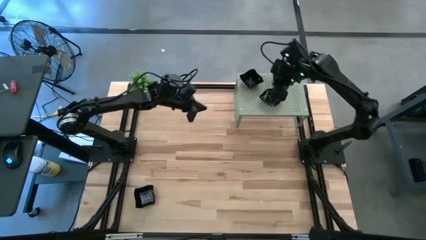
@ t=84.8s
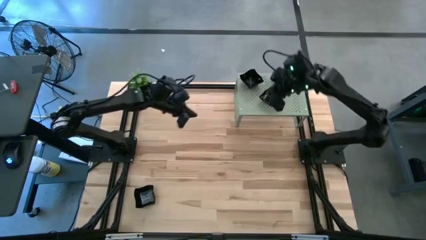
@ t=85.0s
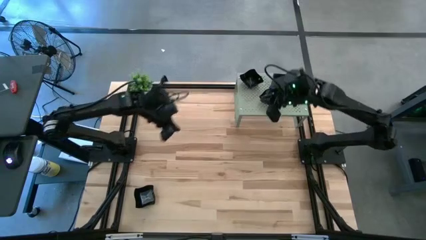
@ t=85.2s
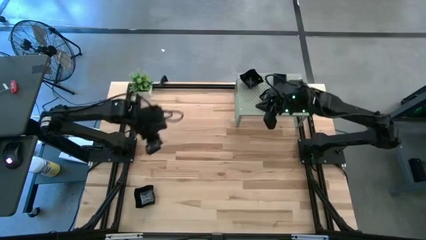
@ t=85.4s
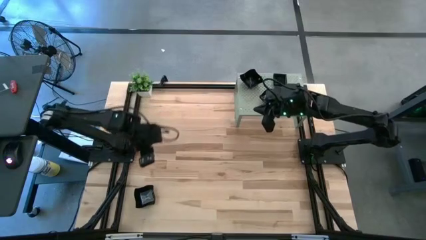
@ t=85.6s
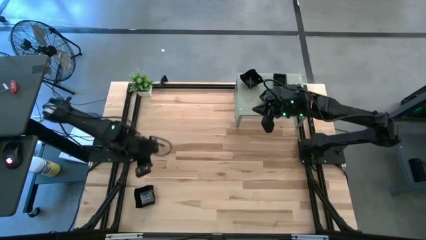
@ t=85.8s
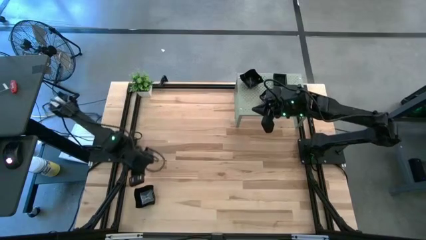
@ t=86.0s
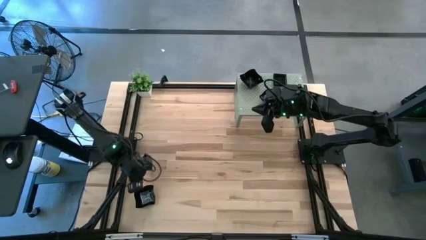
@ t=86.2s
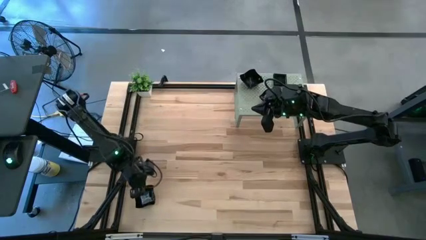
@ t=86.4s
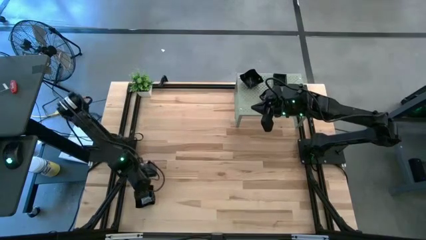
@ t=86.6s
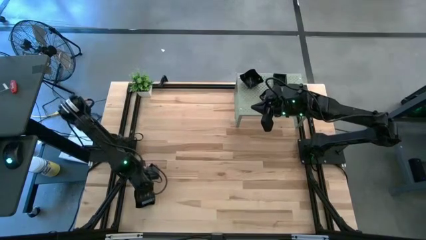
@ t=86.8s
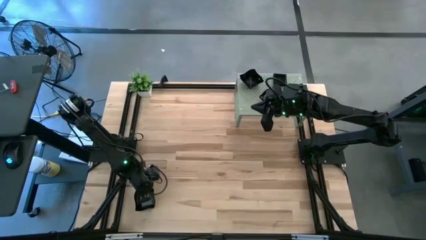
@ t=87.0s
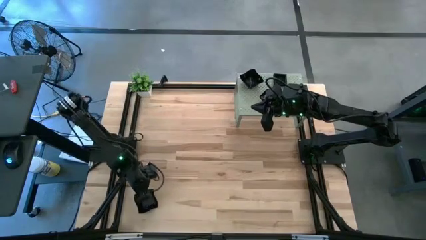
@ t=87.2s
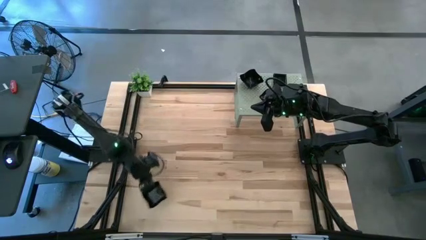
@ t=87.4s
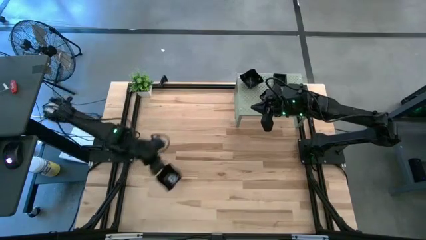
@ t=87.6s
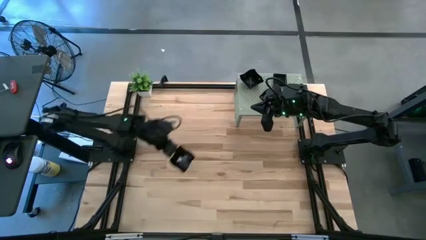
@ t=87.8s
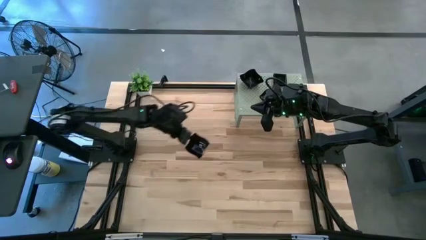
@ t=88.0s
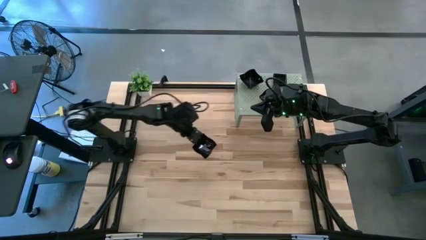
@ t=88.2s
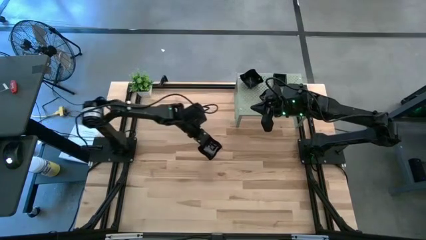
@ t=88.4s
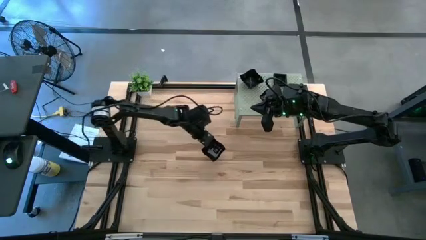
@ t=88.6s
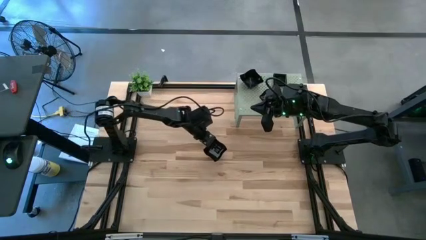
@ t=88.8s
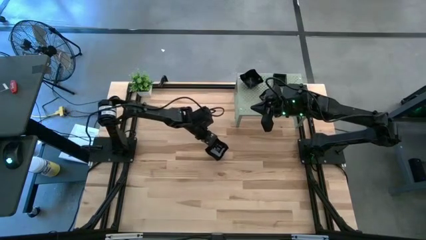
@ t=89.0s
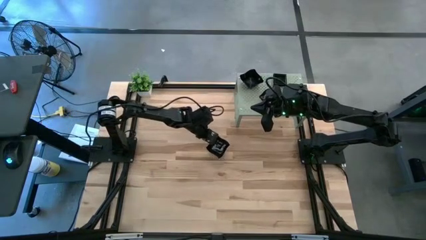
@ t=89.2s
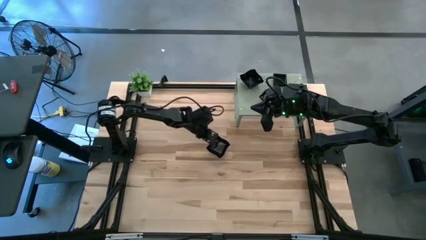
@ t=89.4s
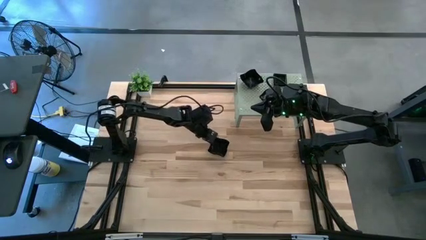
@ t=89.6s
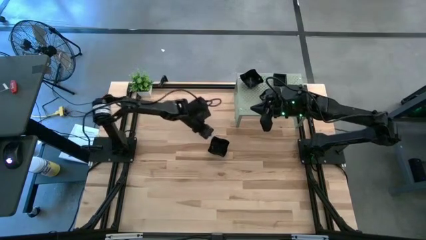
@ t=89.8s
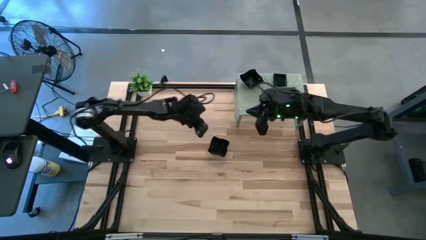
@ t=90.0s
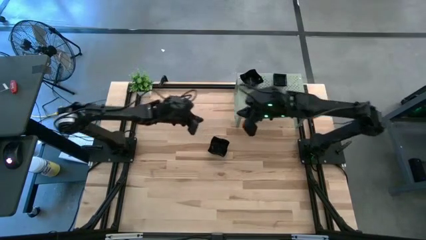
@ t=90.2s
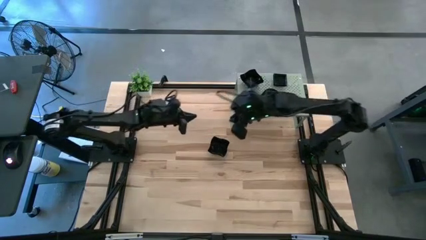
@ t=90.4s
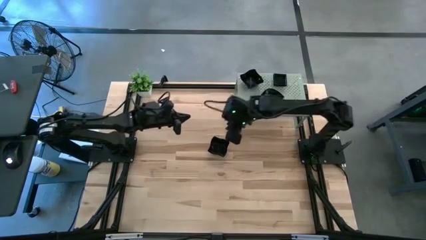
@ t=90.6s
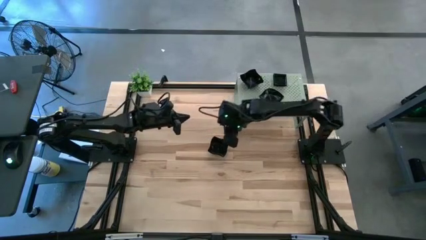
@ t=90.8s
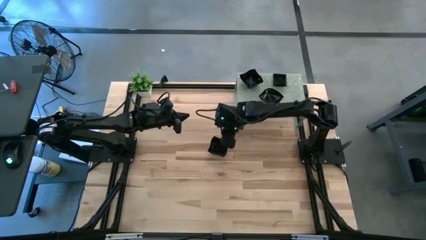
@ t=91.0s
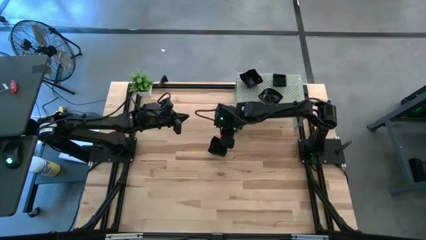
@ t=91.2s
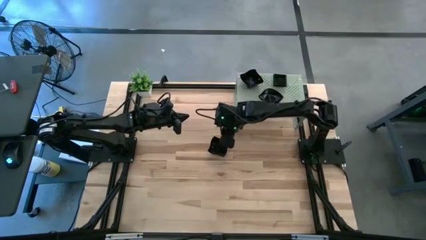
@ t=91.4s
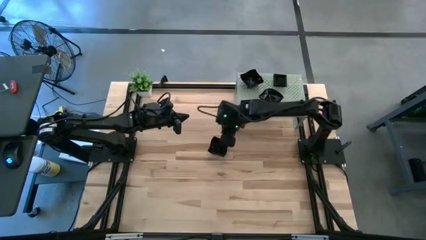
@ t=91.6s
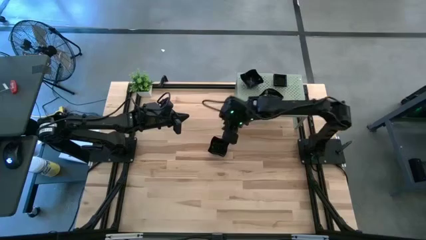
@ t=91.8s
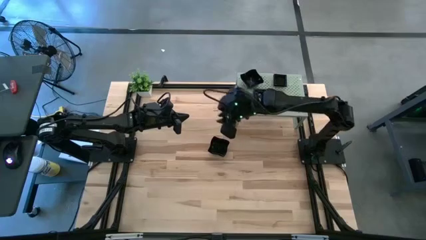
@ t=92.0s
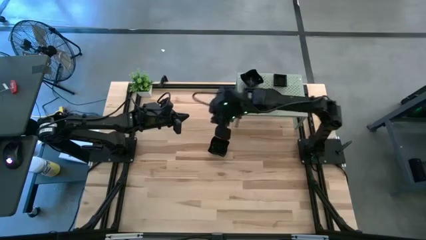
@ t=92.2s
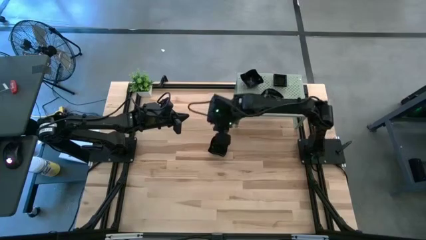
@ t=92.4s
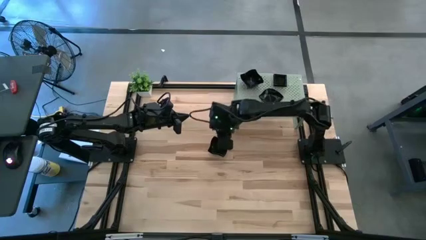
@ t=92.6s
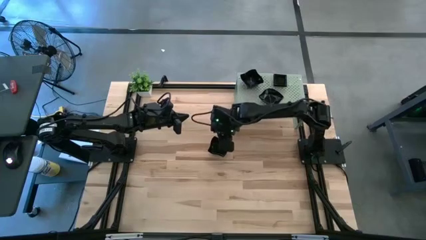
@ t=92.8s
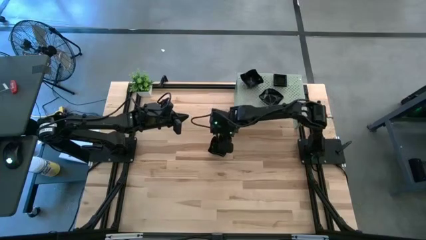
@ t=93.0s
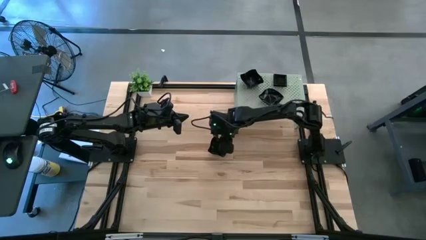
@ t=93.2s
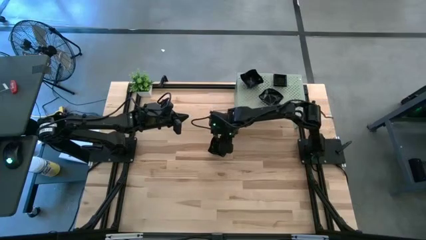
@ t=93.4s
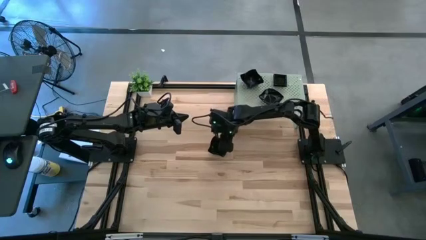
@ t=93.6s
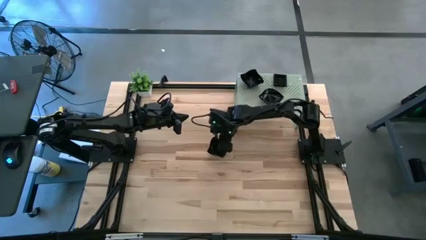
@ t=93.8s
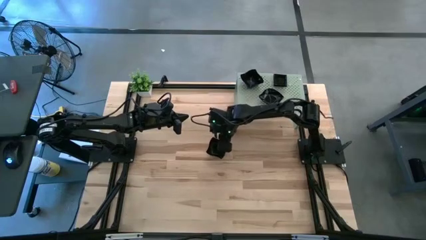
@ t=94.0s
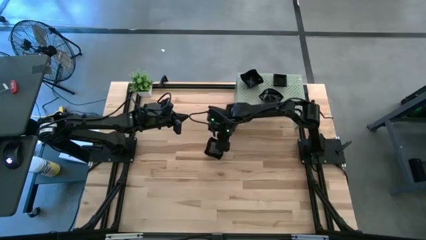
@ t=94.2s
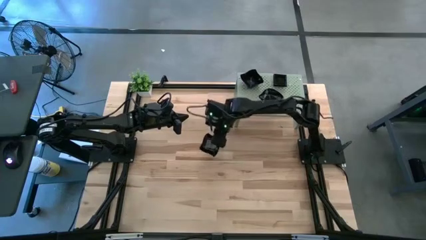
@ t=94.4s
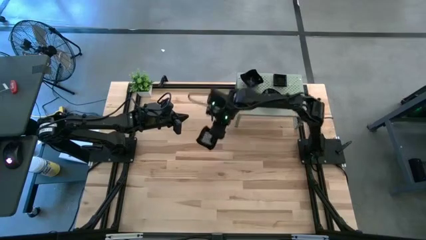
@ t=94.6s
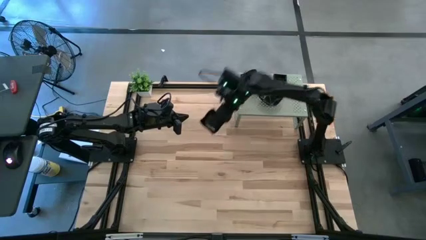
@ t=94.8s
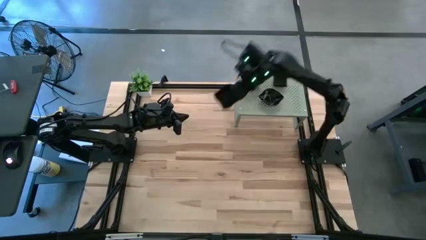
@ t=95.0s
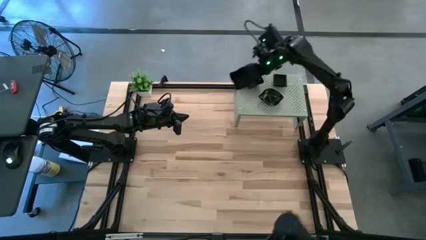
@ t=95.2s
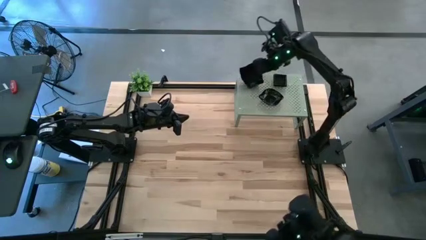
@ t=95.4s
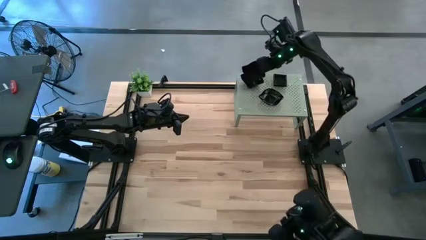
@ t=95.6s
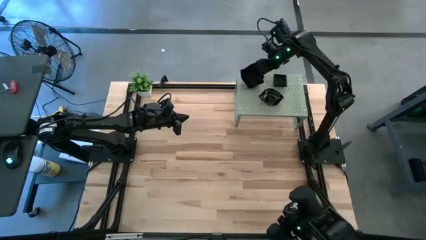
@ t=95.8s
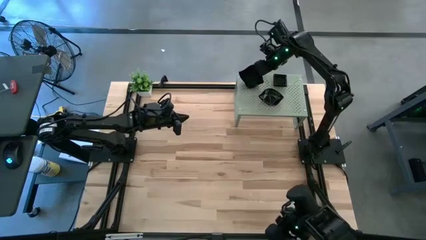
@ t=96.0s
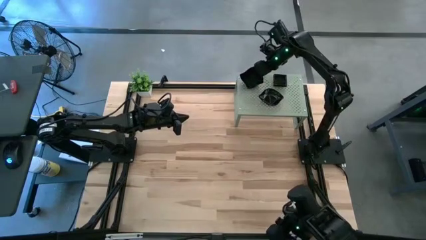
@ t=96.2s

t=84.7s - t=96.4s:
Task: Pick & Place Mini shaped plates
Stack the distorted square plate on top of the distorted square plates on the shelf

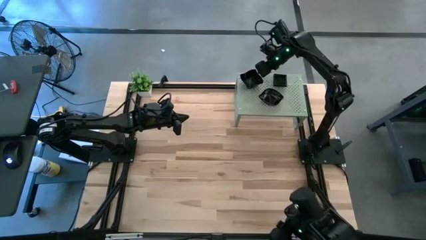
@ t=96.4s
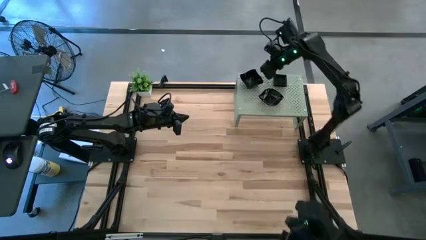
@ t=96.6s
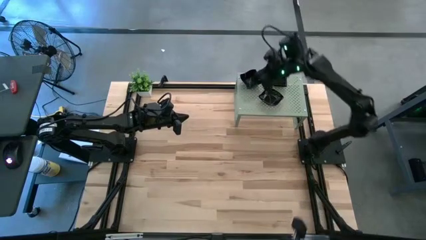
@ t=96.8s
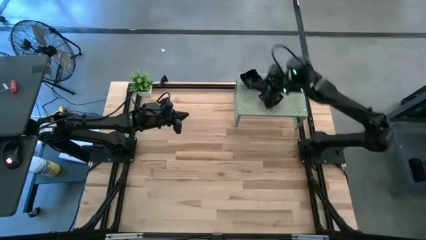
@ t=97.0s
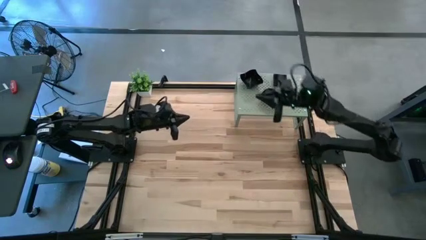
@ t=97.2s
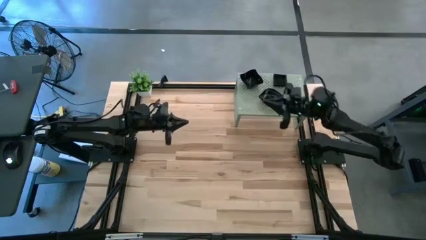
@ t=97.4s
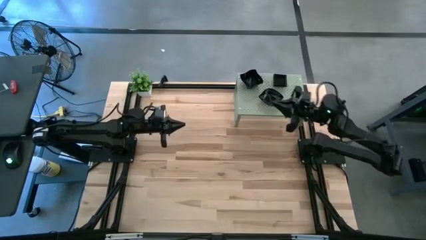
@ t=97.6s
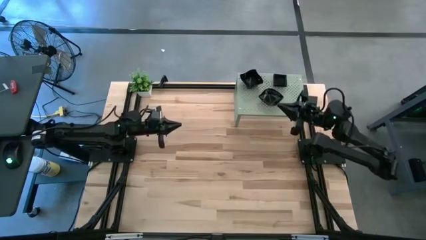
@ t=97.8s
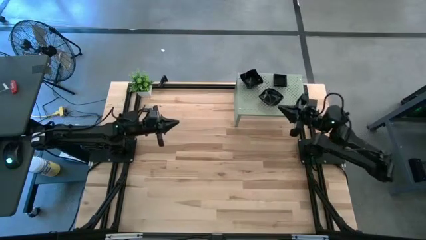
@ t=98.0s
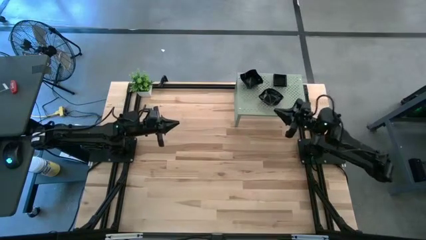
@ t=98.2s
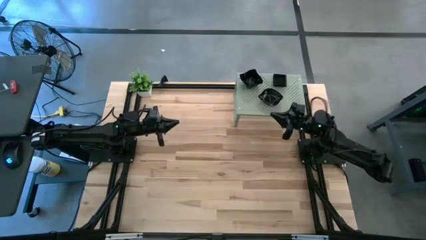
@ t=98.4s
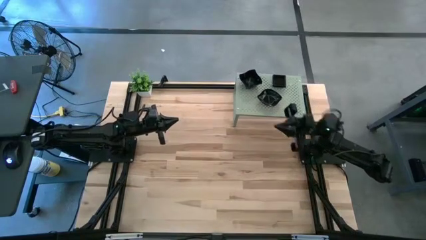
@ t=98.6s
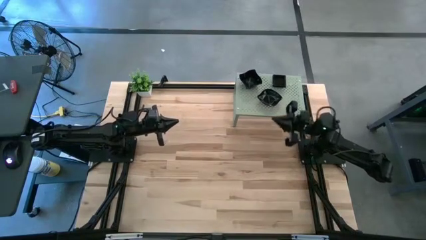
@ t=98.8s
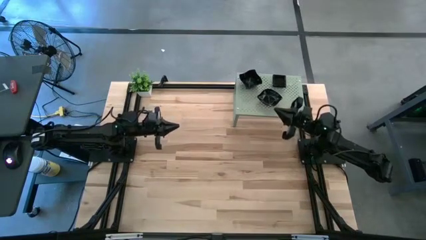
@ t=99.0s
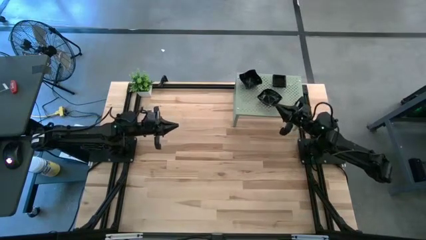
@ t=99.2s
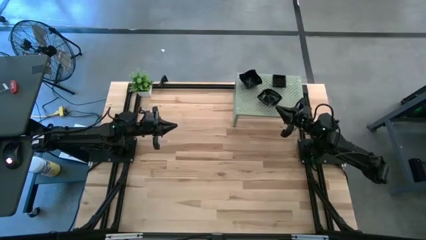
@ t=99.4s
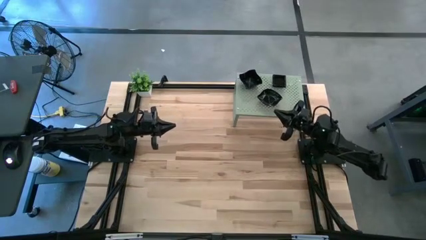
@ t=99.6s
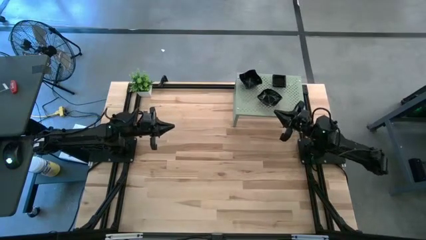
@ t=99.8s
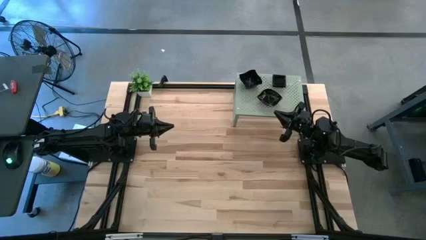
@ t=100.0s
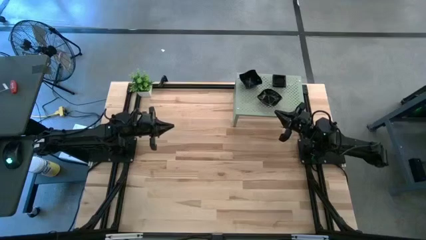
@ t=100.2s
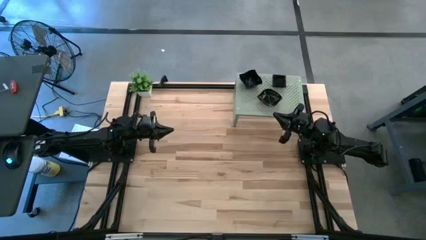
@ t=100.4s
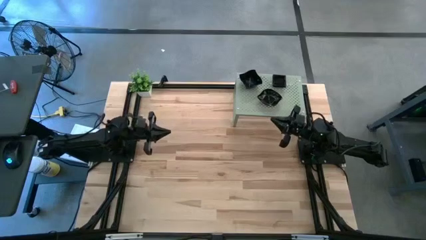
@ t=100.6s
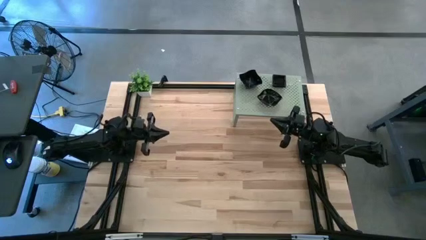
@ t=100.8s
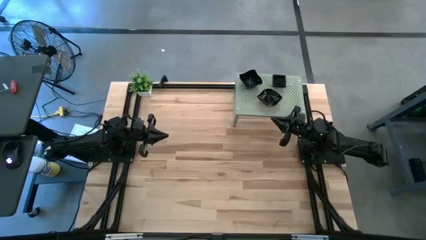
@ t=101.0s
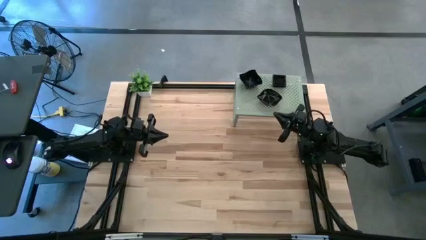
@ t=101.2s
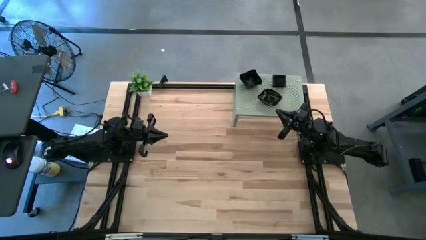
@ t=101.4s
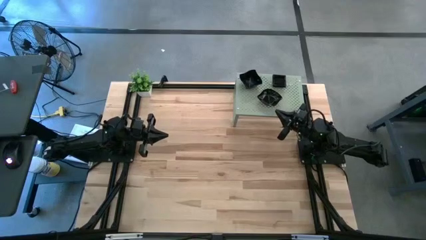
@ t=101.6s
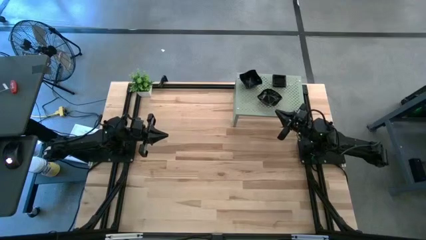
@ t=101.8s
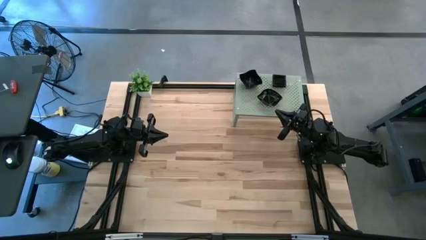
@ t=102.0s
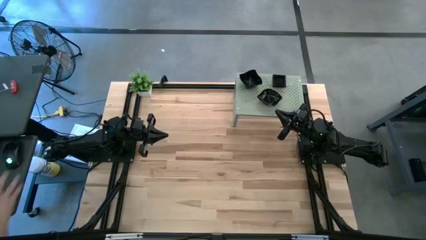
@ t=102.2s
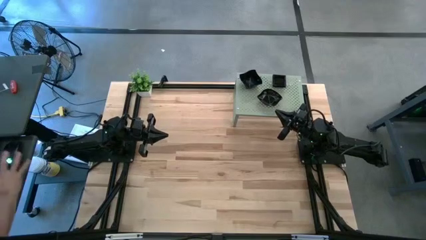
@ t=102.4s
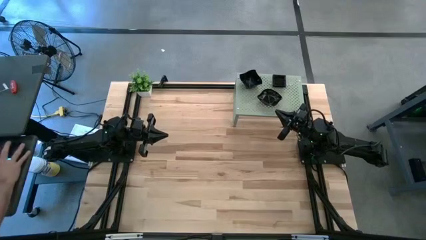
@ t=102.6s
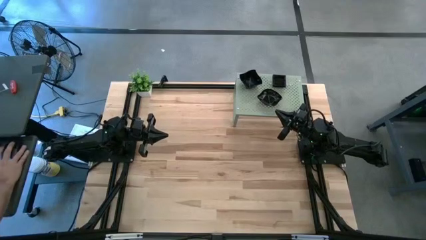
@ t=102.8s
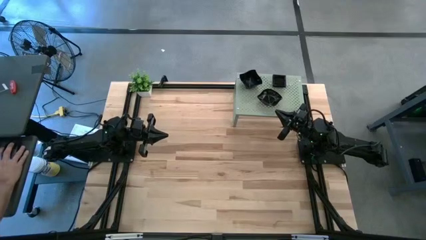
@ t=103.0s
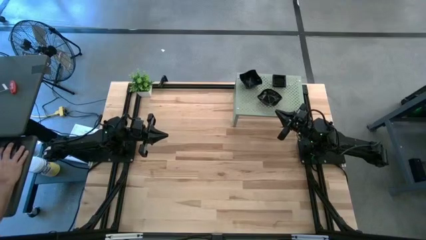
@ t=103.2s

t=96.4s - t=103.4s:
Return to Home Position
